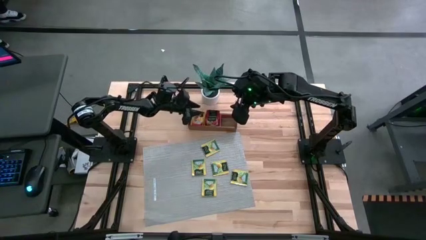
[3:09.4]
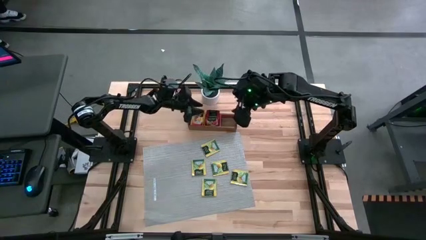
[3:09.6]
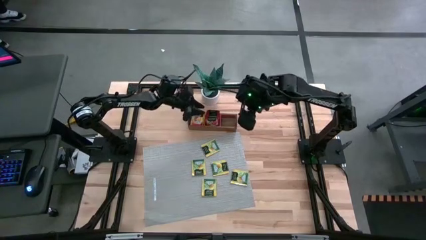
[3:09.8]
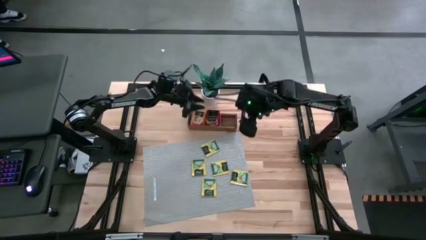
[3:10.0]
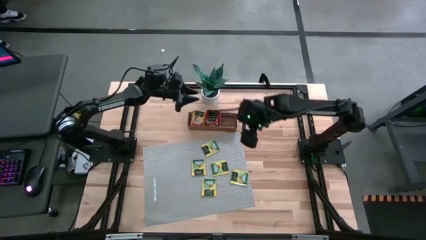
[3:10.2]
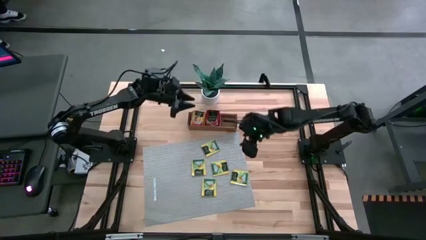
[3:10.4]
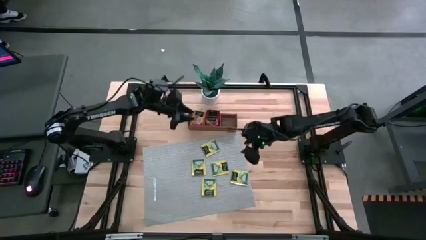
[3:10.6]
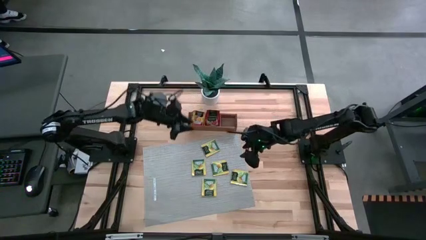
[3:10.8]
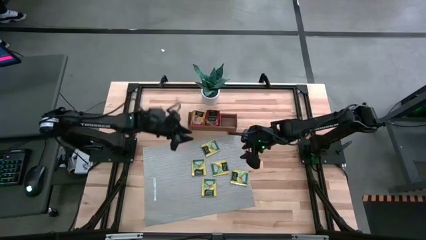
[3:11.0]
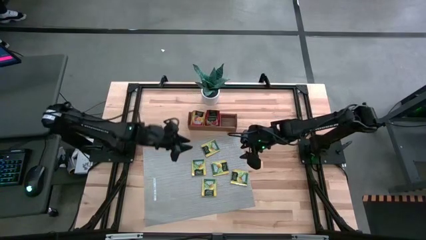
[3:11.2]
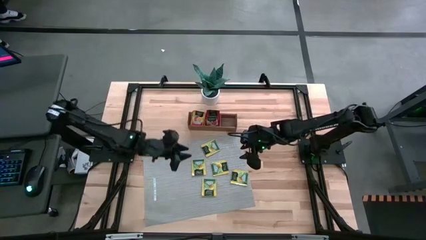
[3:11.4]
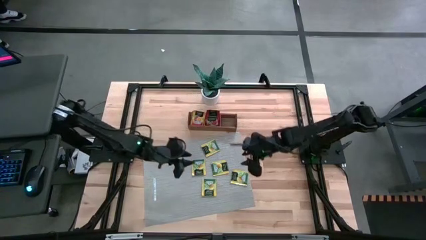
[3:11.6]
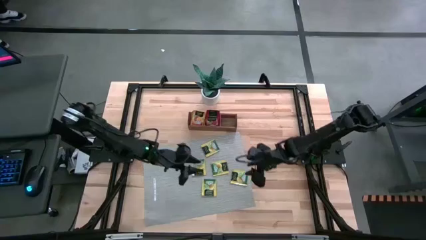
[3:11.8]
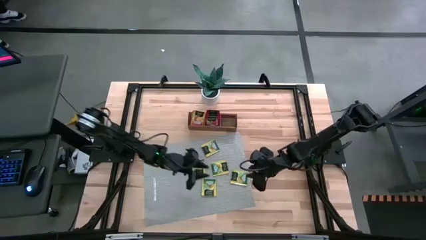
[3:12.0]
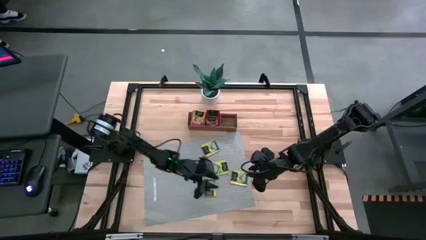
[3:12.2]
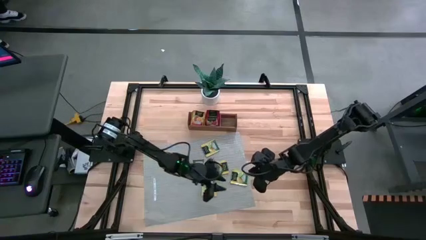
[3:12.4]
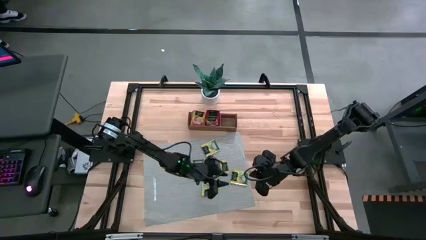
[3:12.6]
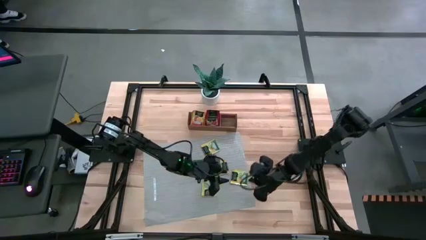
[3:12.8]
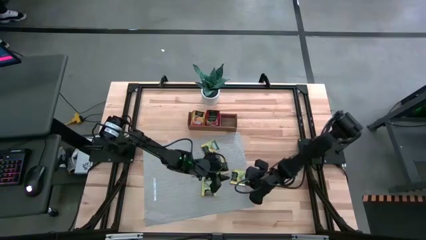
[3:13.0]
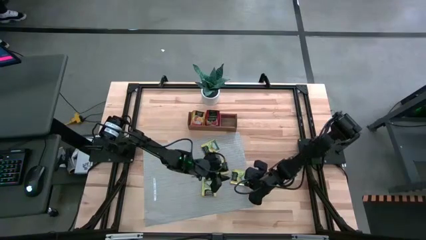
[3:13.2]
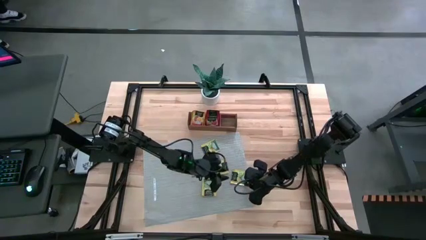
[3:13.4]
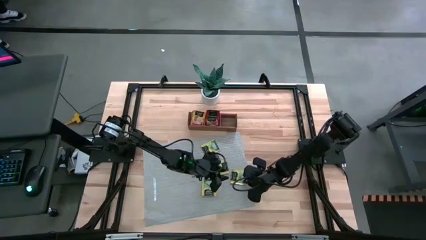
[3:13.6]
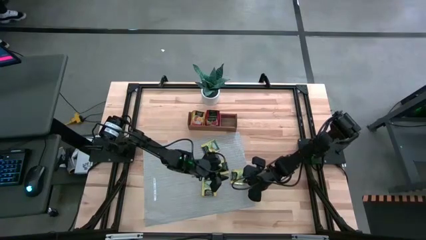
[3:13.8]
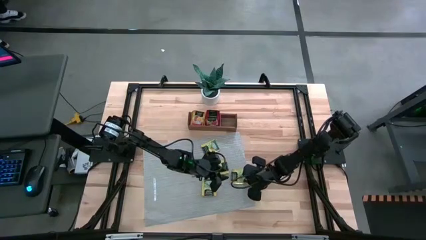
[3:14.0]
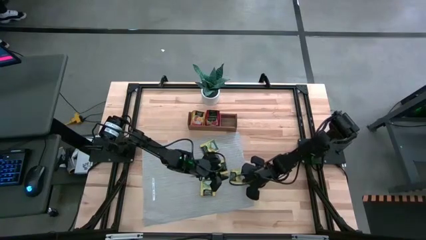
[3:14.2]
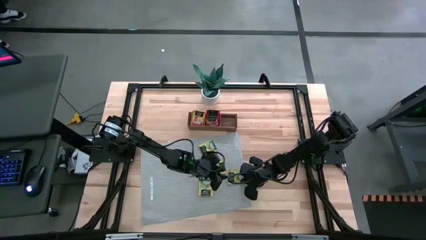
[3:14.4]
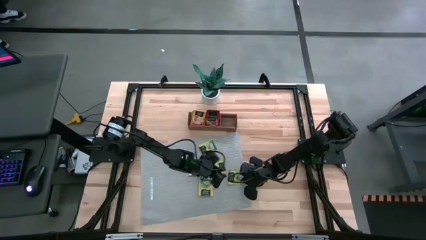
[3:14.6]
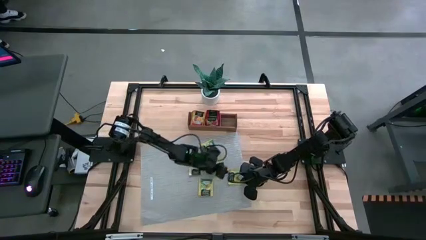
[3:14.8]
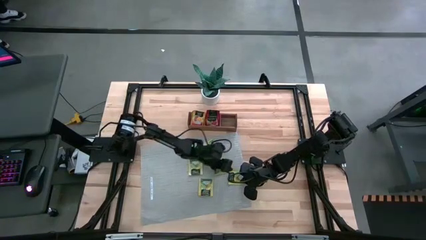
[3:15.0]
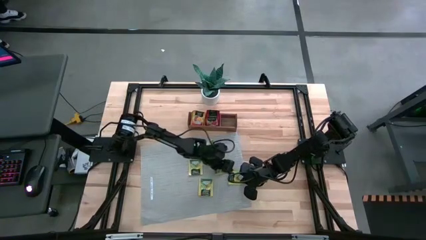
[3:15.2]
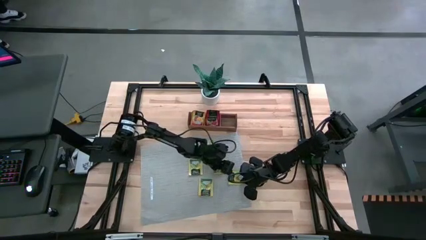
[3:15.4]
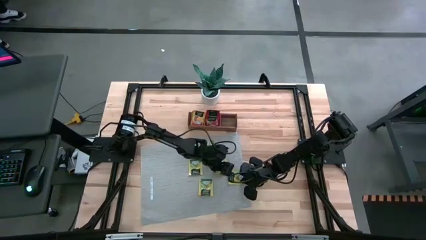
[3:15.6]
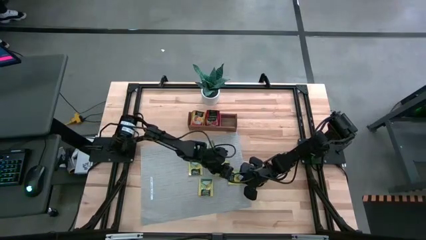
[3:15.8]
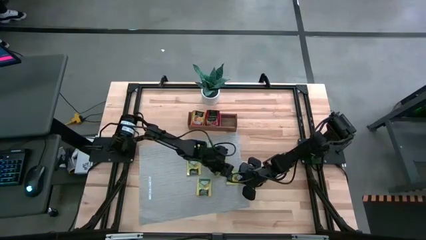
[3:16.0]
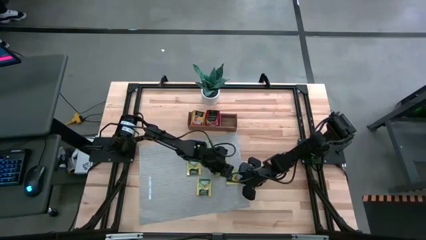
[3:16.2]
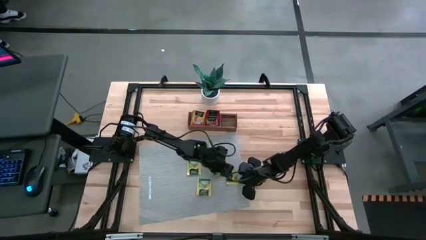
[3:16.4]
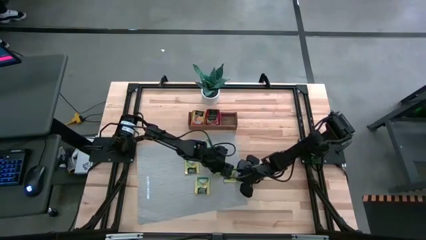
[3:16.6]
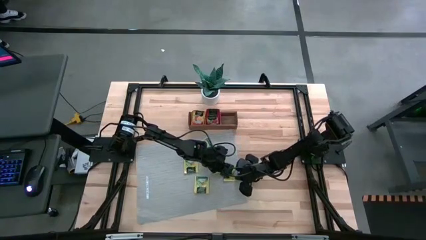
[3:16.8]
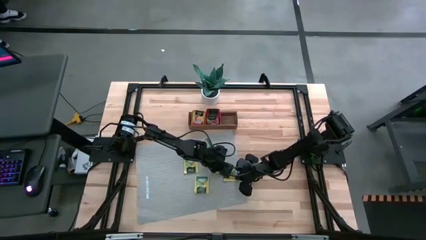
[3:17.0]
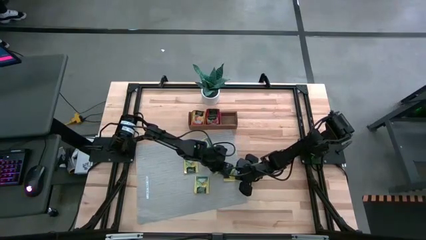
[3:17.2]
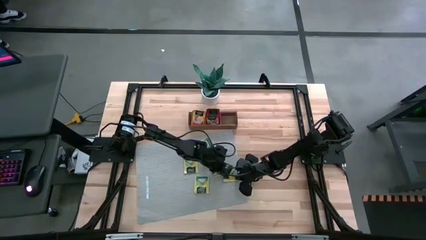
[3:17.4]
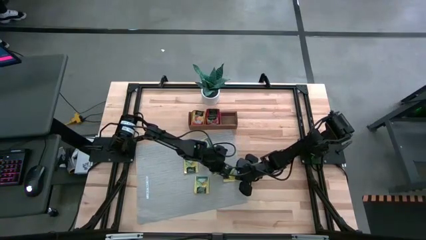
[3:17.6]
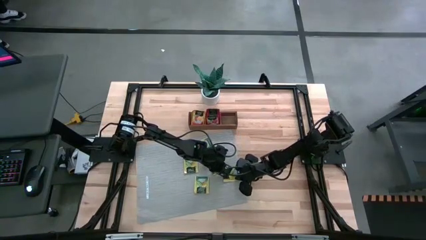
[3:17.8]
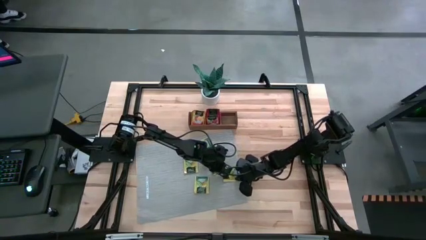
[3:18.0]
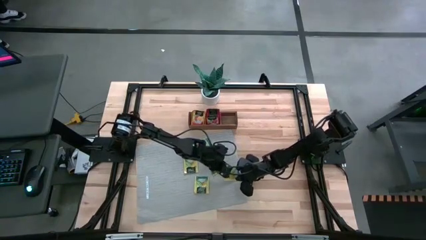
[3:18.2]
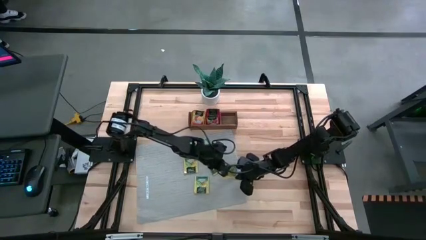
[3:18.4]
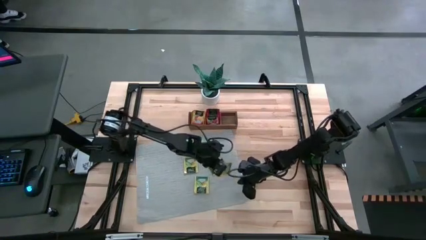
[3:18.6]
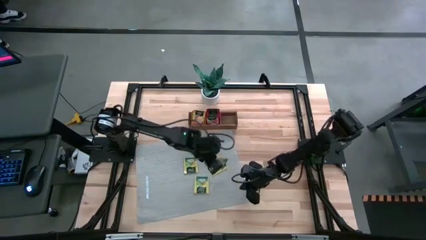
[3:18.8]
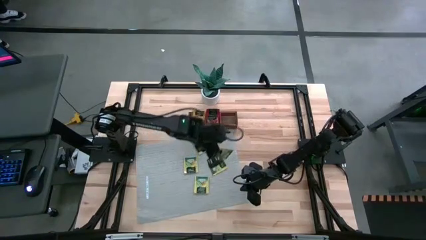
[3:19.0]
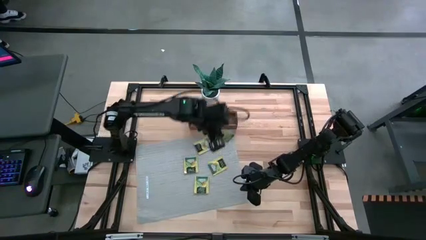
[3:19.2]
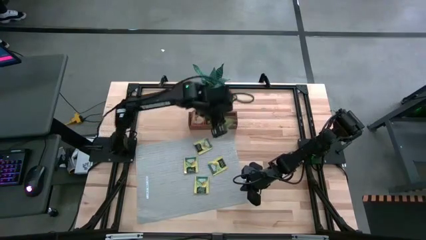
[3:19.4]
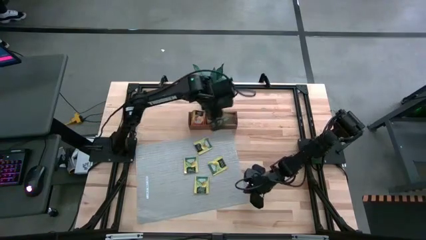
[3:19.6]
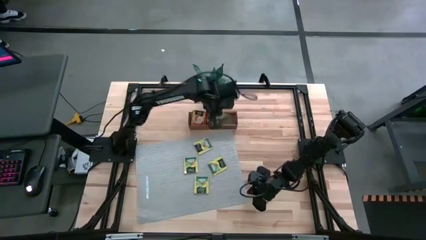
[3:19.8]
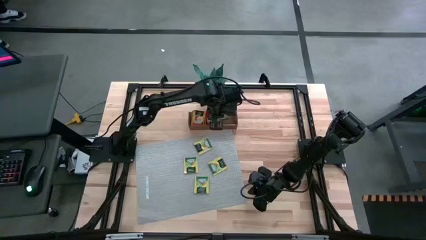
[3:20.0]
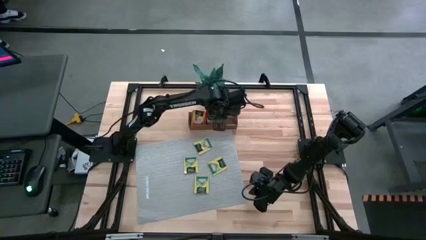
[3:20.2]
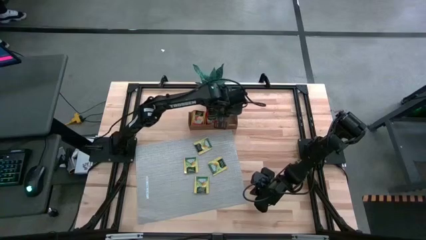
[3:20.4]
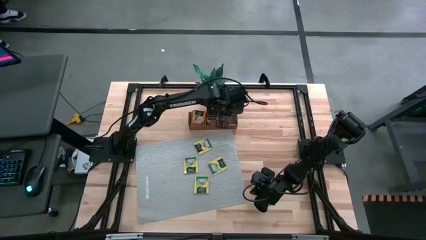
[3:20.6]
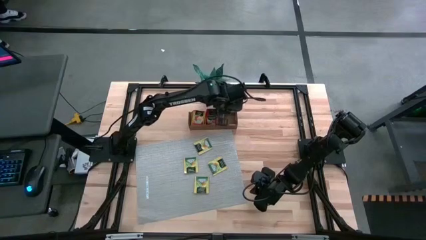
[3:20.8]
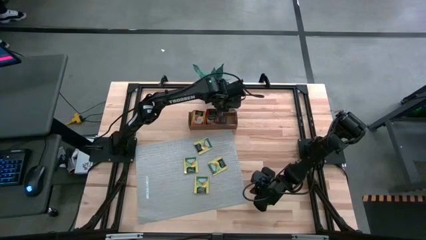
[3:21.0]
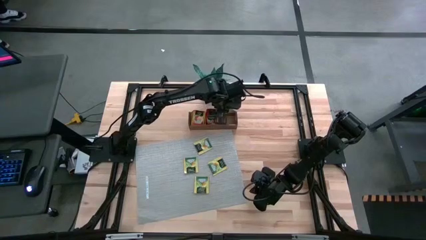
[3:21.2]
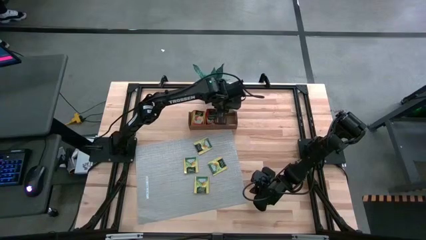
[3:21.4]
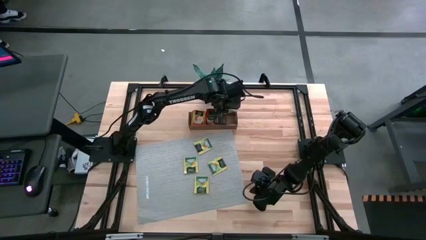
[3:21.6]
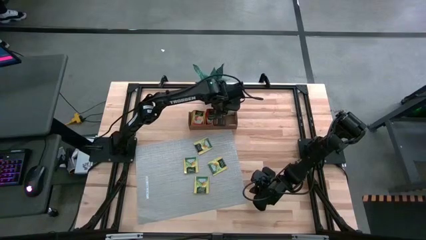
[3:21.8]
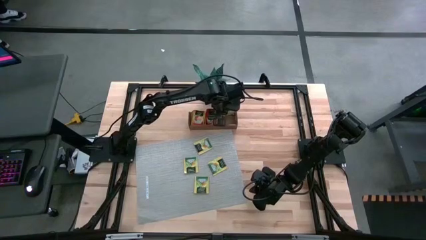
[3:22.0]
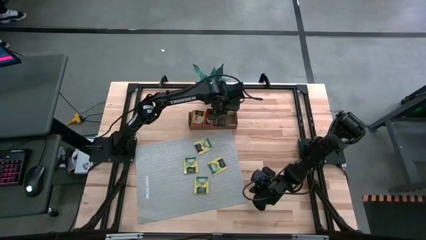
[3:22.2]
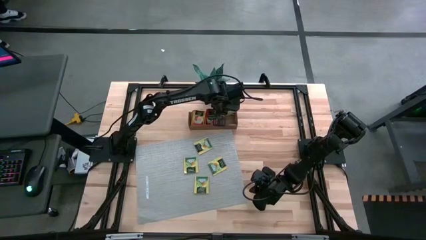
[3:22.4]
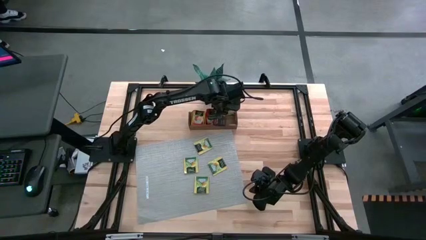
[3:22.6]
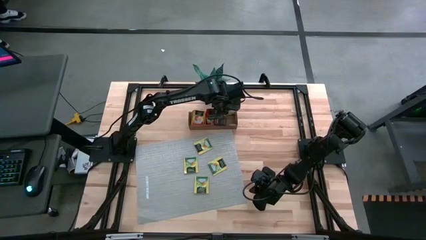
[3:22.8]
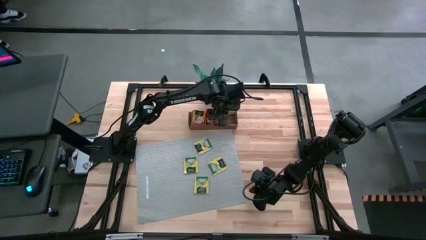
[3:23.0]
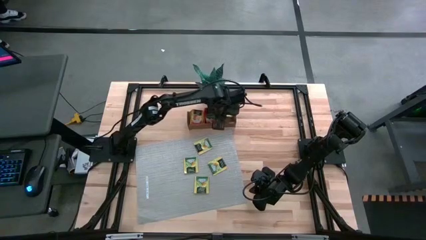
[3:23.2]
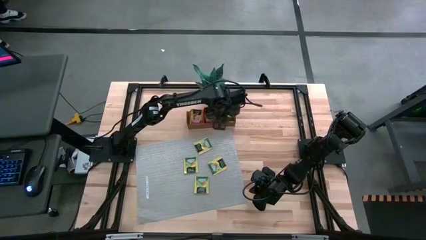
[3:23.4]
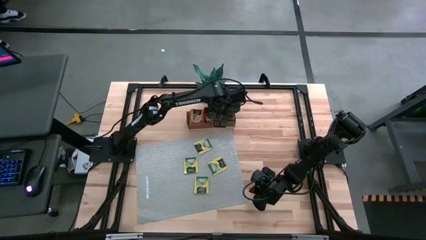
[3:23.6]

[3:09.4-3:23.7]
Task: Pick & Place Tea
Put the yellow tea bag into the right section of the wooden organizer
